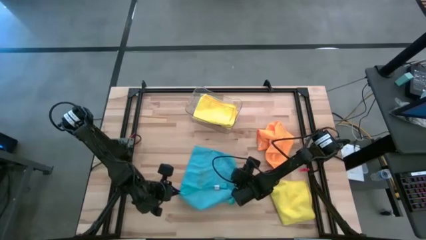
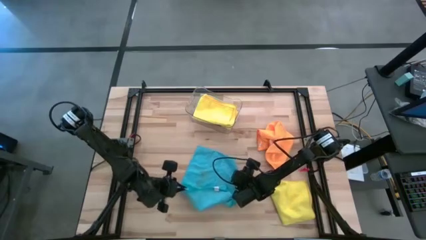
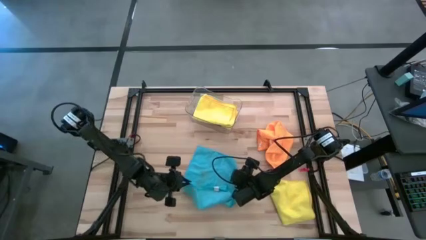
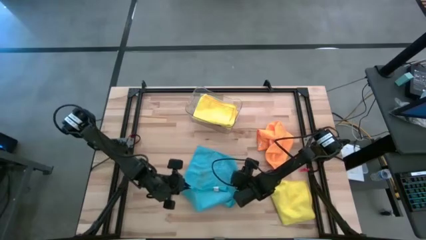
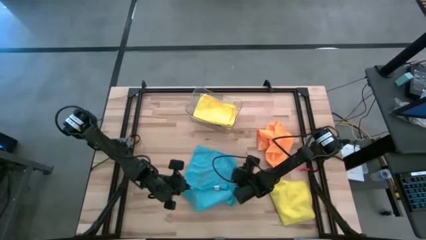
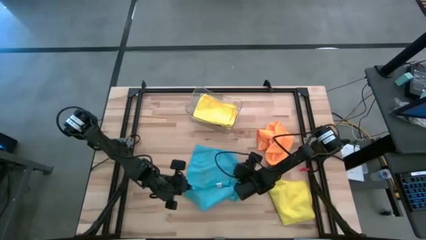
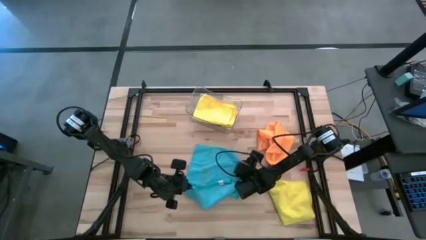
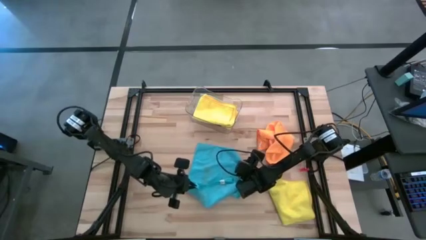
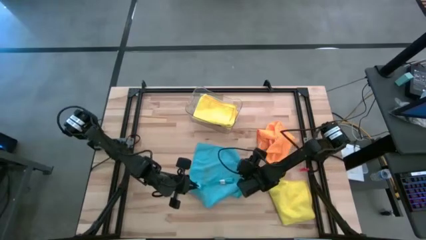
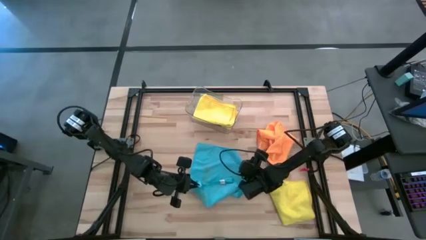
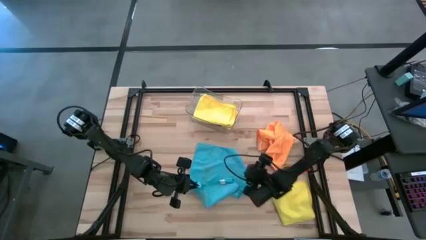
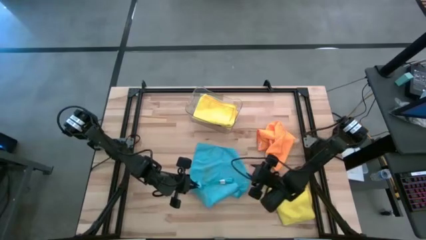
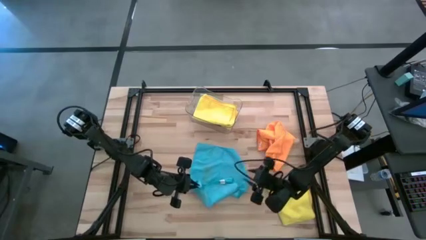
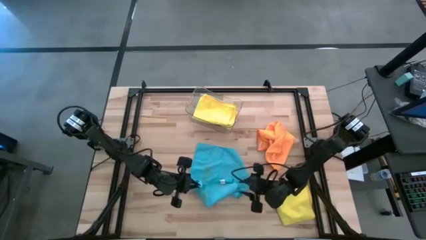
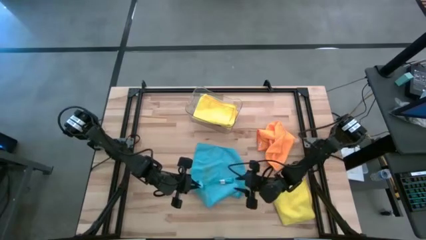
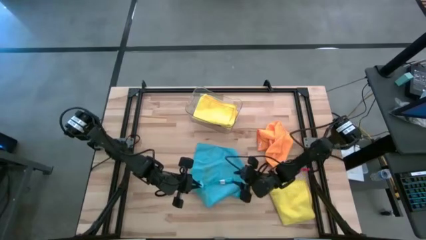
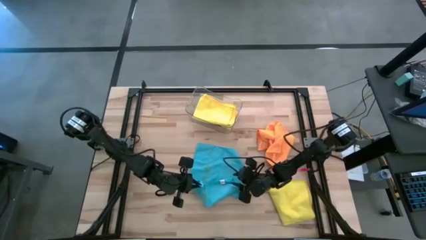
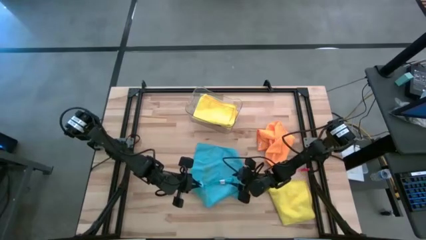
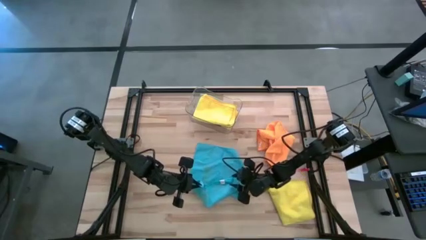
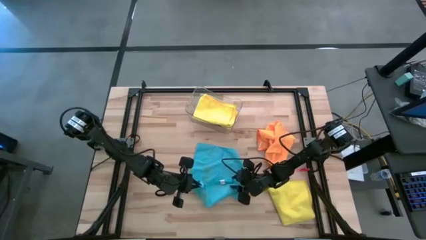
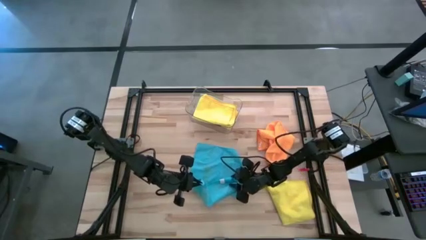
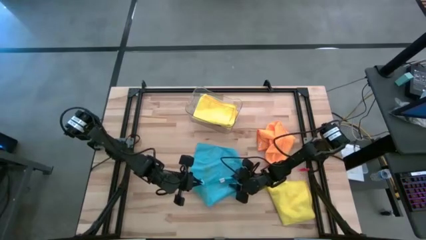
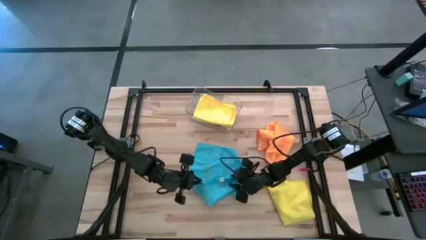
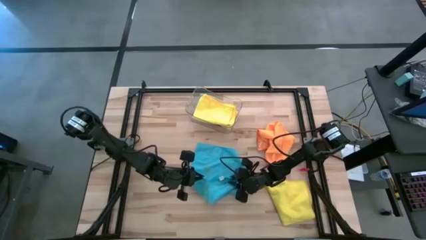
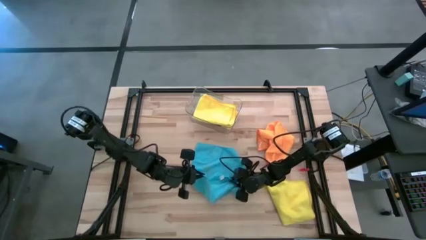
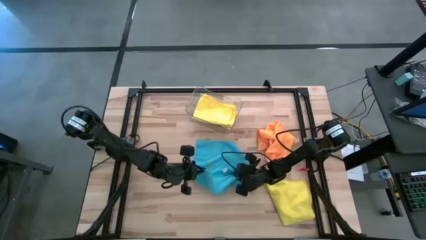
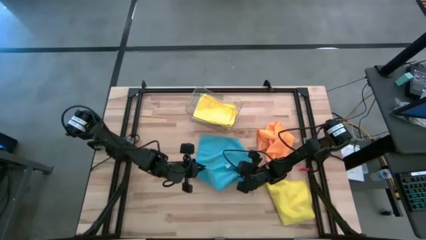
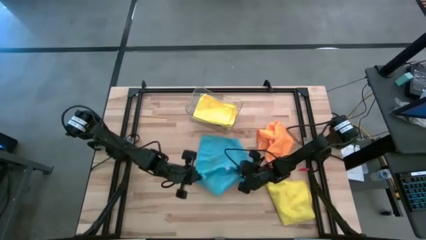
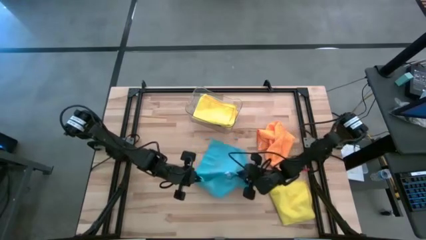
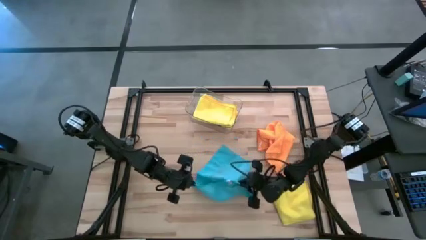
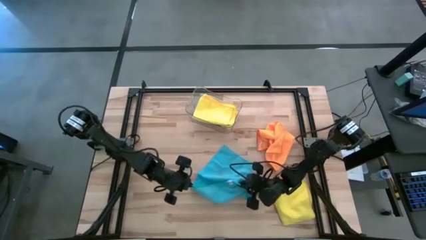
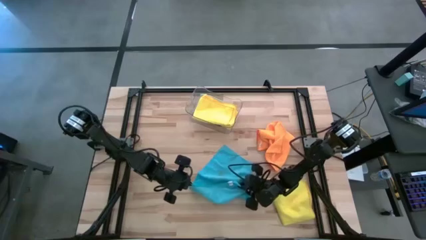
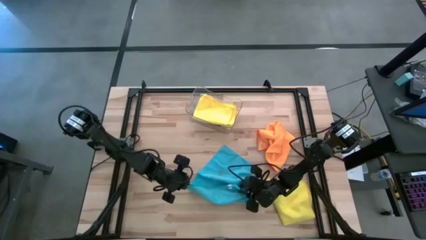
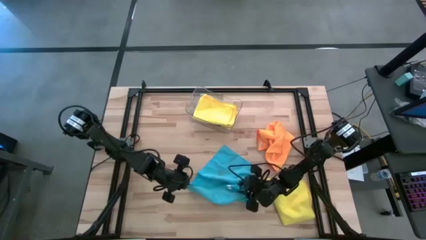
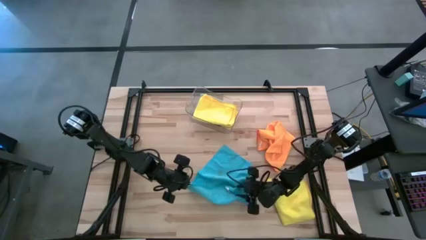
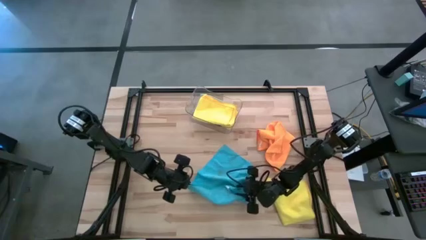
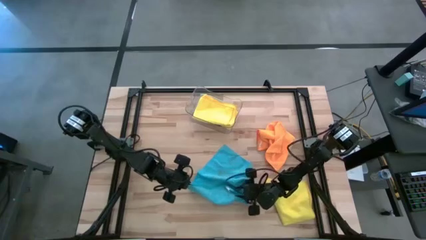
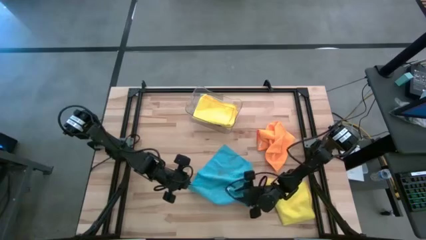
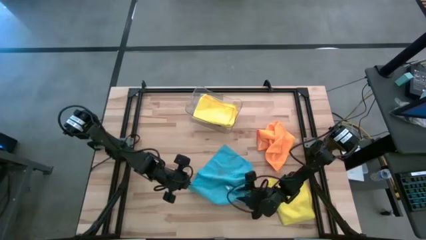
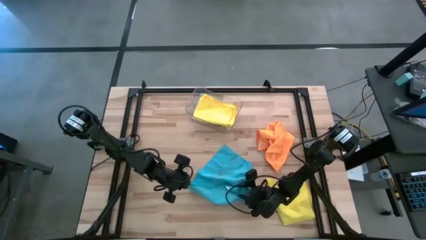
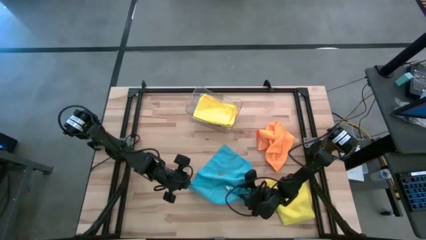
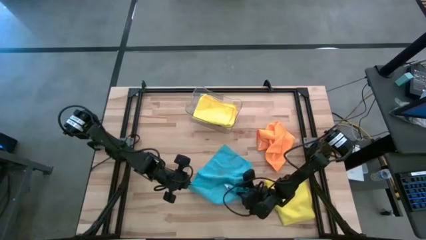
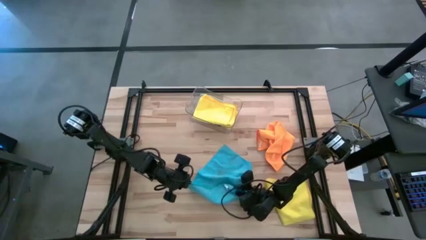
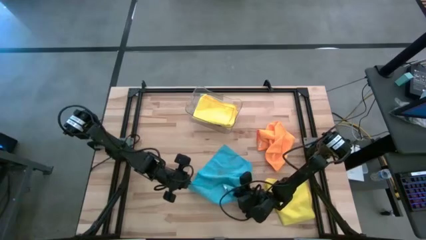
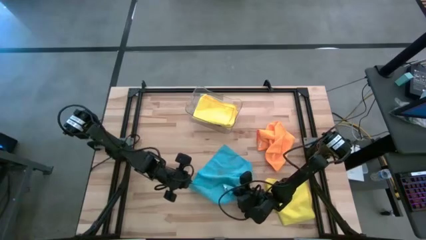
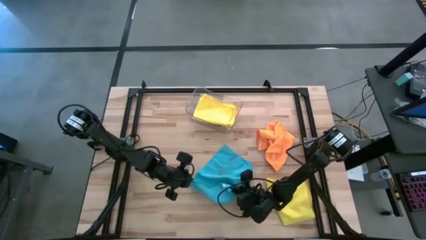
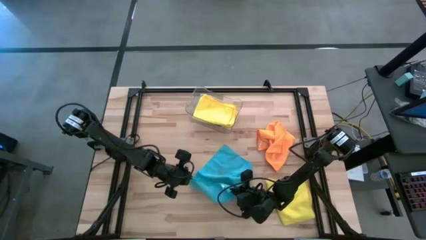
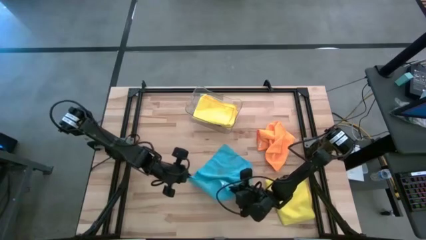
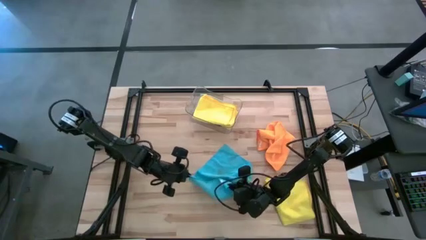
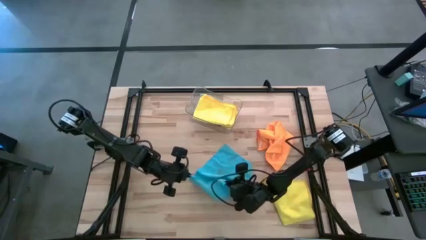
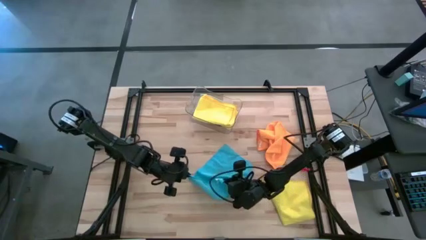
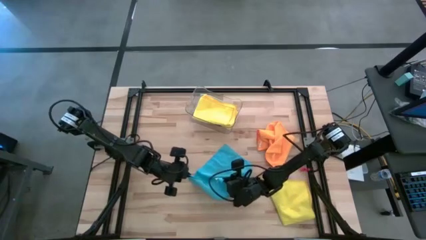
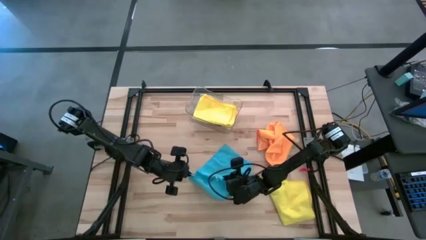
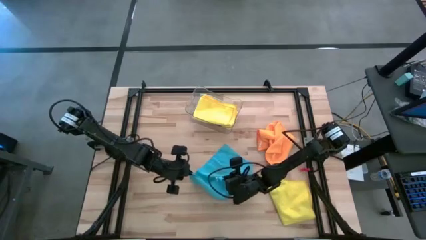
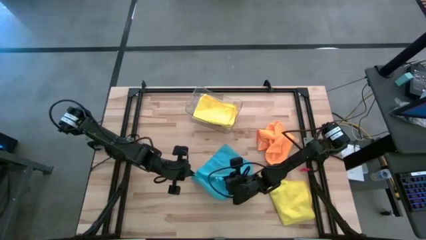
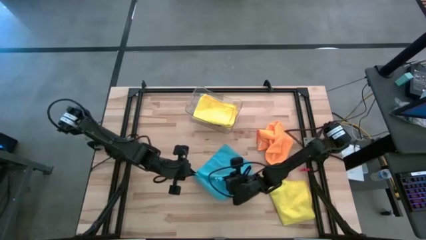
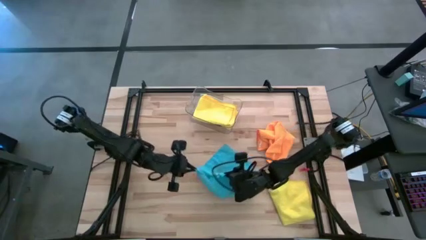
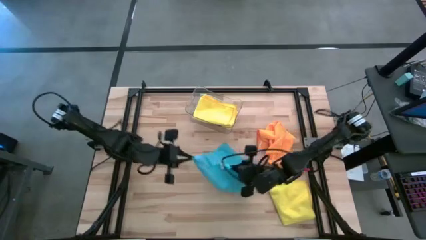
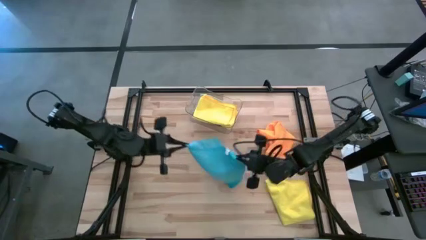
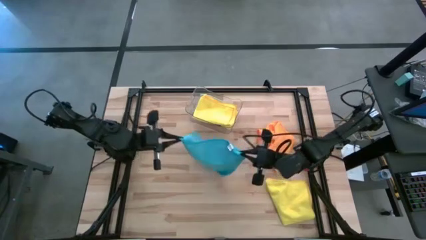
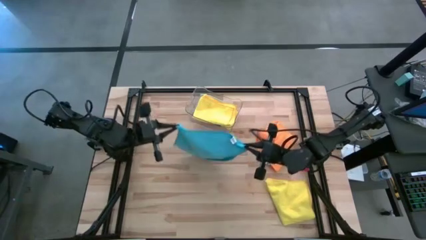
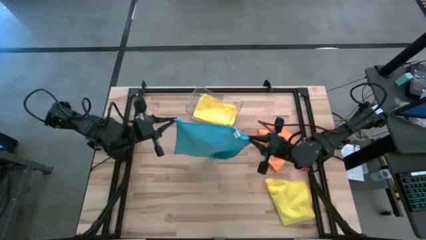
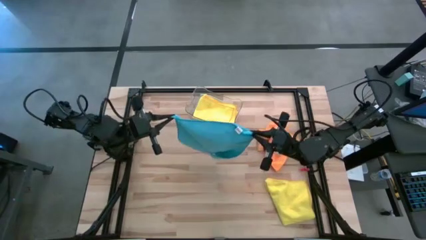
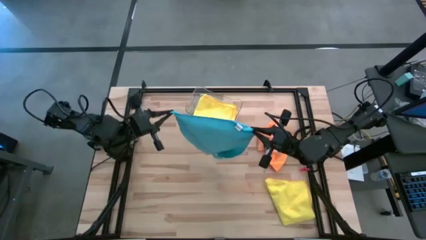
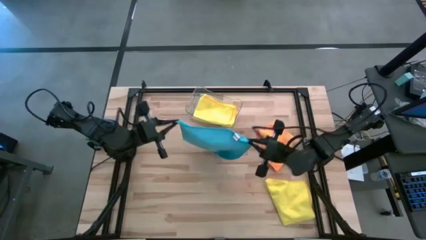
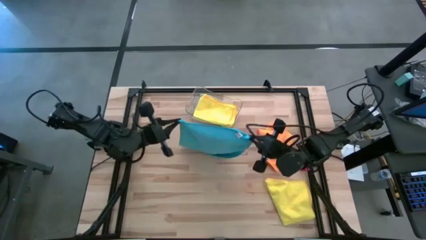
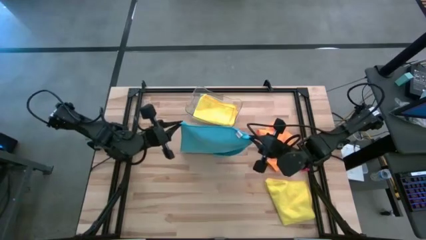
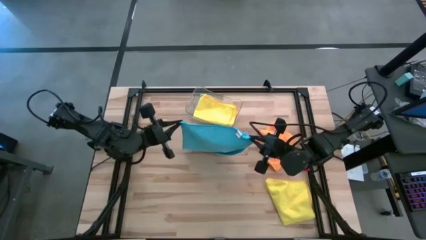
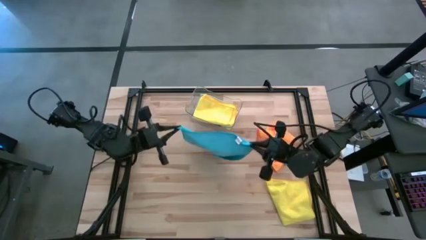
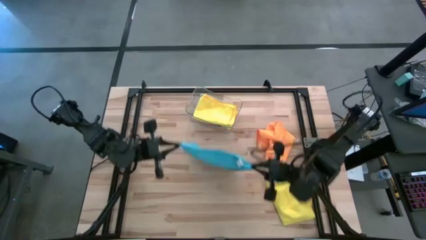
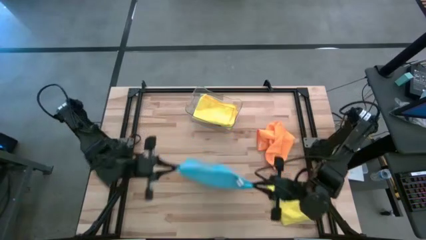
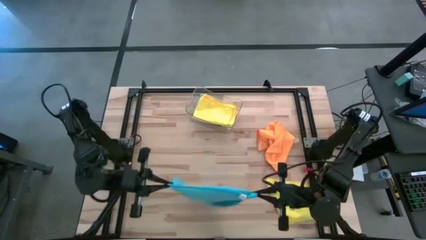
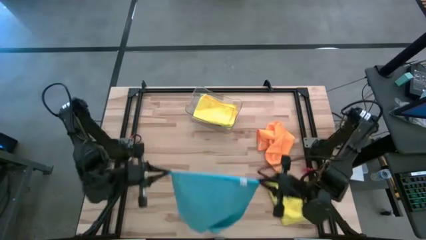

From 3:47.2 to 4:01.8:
Task: Fold microfiber towels
Fold the blue microfiber cloth
